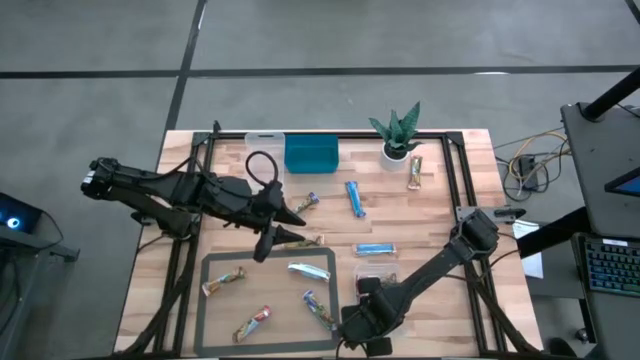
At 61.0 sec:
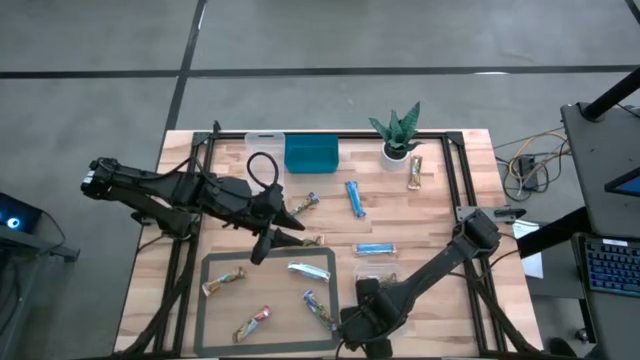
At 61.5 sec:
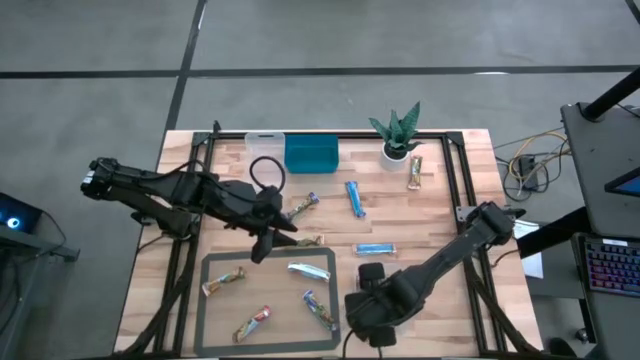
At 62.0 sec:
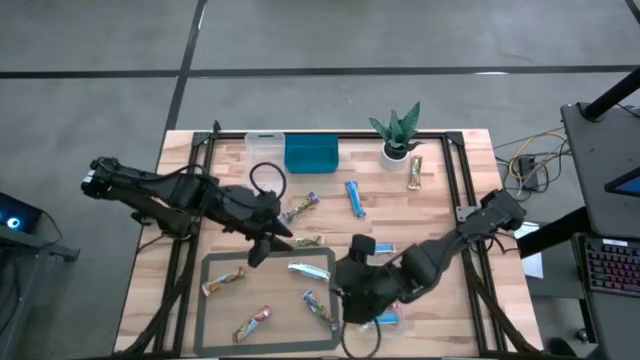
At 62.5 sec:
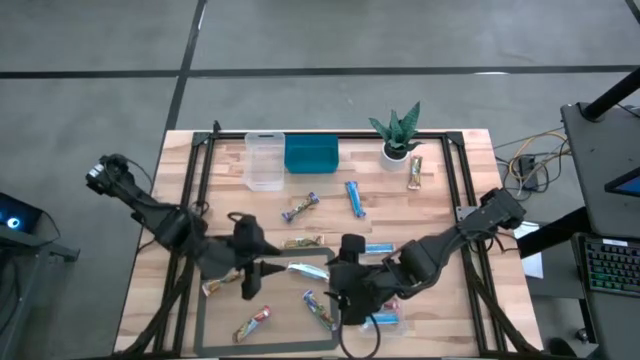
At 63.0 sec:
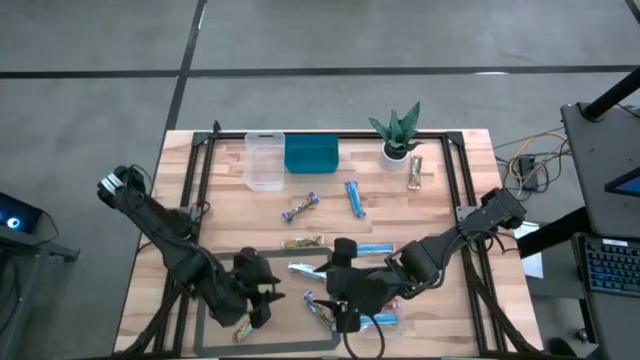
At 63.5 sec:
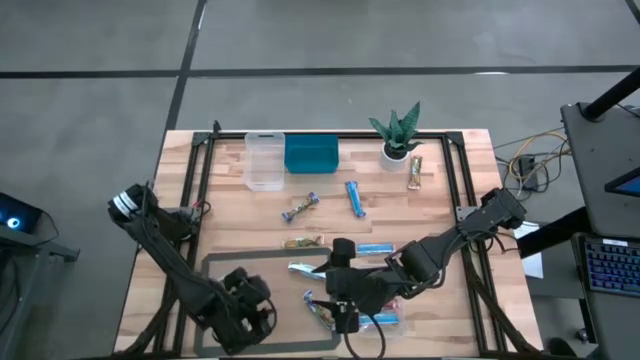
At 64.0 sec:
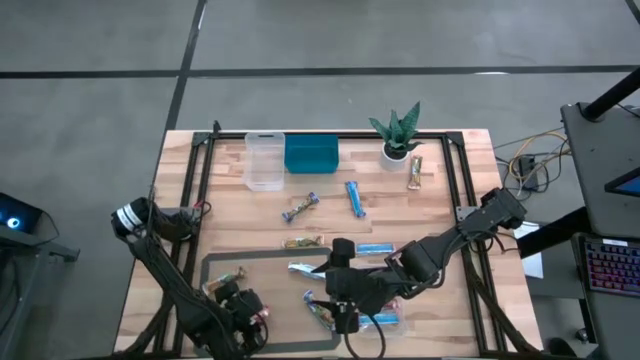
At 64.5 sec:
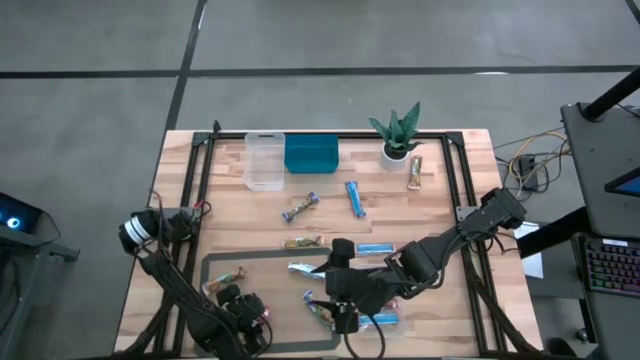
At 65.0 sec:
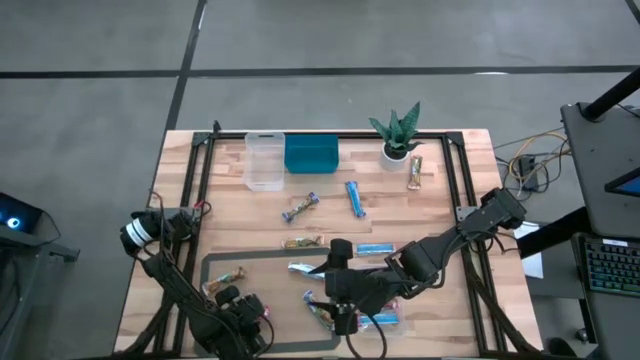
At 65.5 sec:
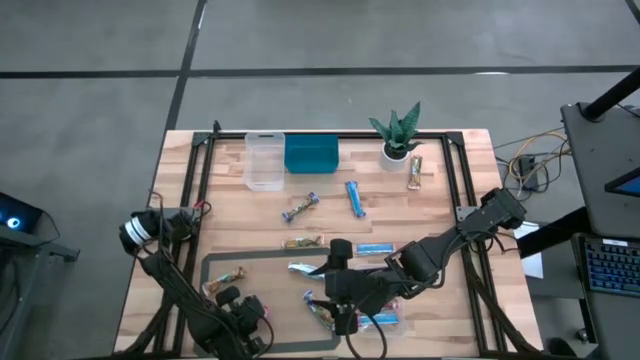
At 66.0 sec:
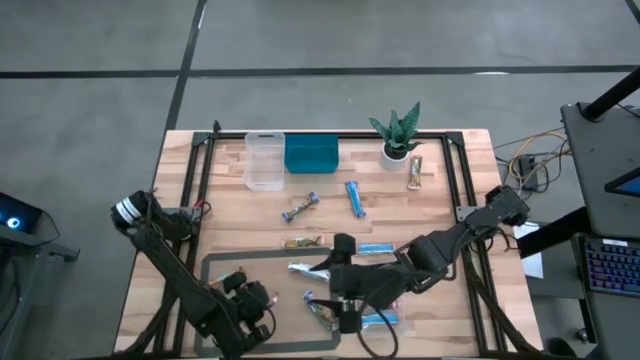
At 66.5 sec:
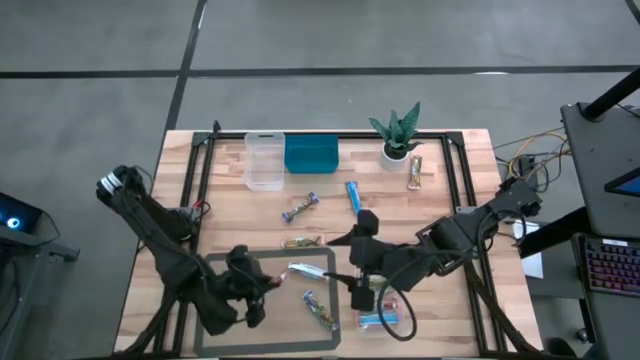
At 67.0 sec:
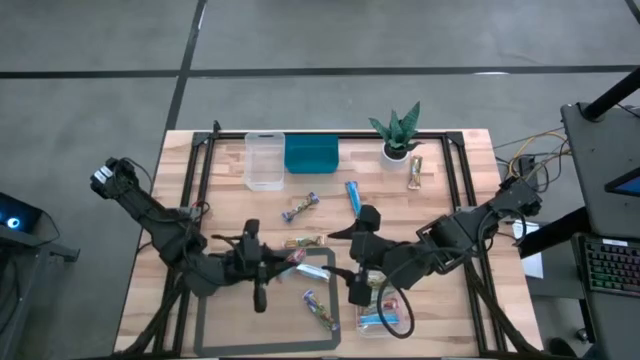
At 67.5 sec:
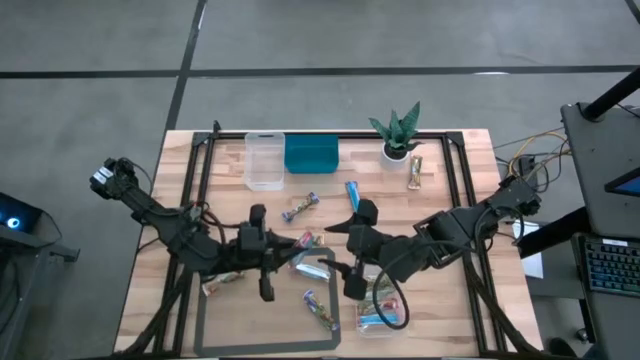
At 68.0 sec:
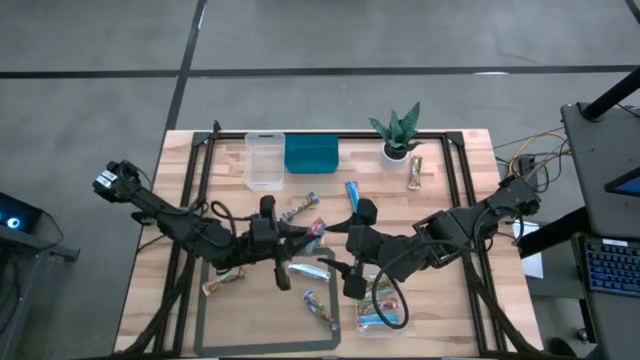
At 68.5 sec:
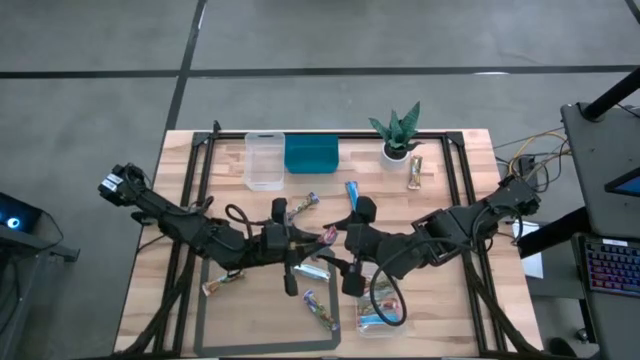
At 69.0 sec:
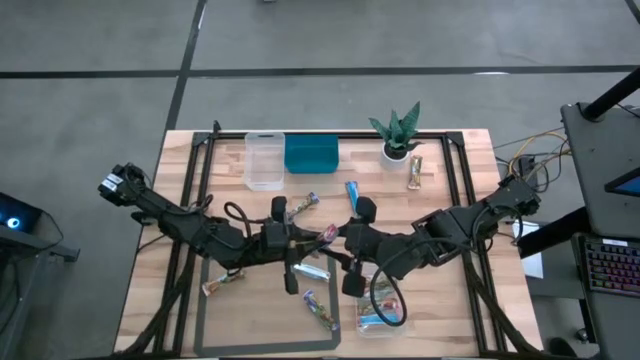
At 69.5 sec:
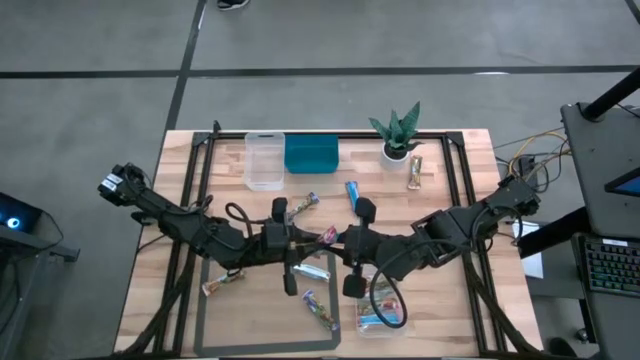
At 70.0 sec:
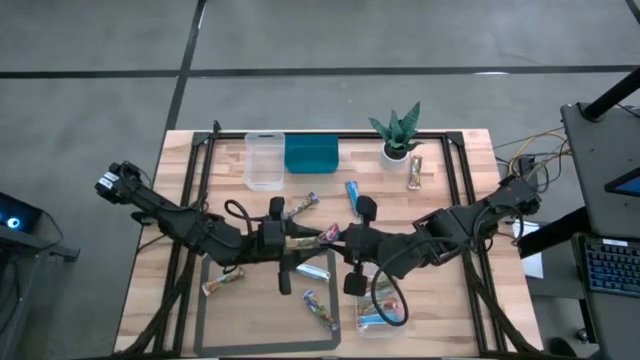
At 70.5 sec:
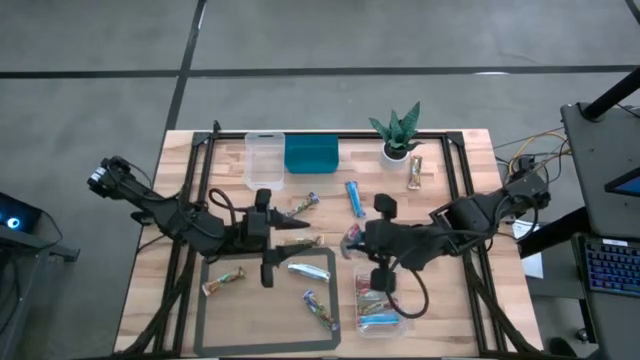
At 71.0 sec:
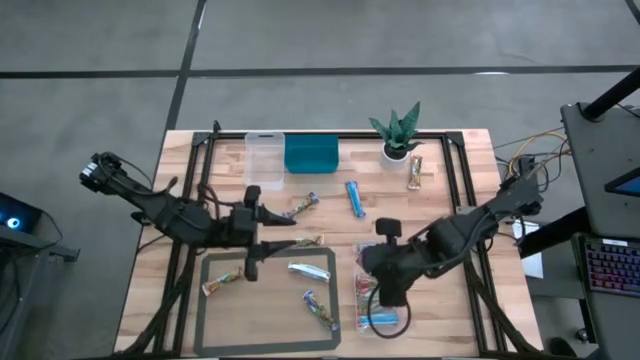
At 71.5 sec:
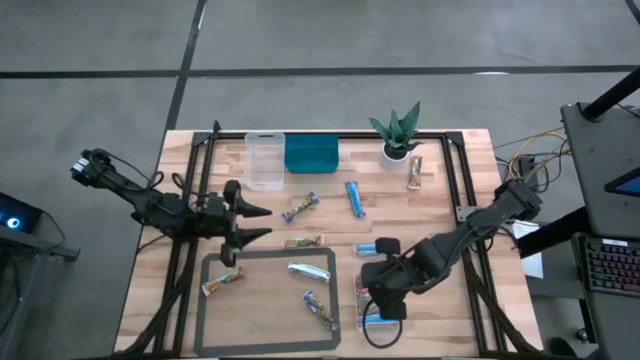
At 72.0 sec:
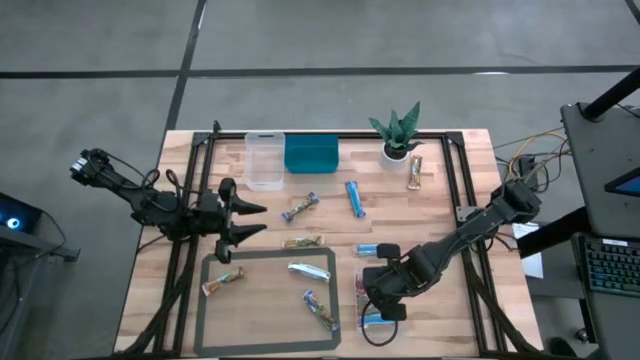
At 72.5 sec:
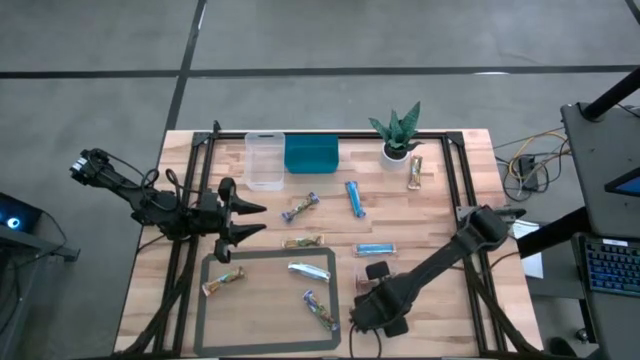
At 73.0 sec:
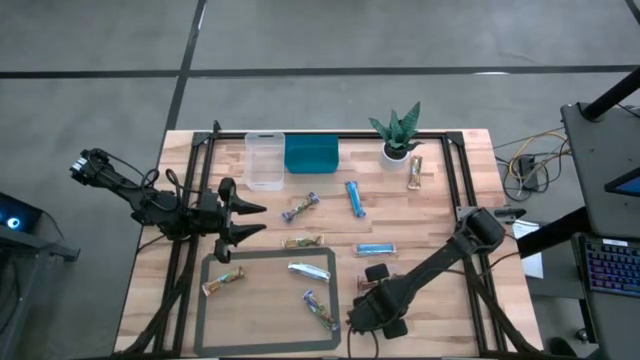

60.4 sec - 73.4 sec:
Task: Pick and place Granola Bars by type
Put the red granola bar into the bottom transparent bin

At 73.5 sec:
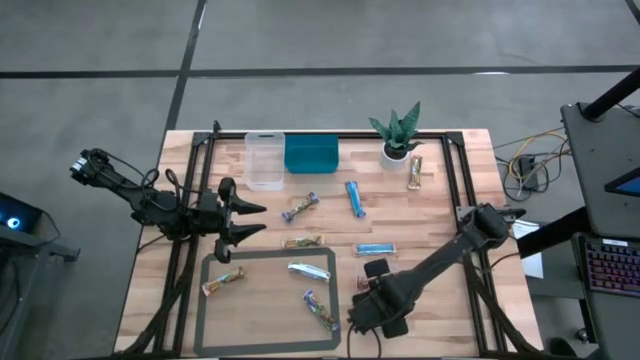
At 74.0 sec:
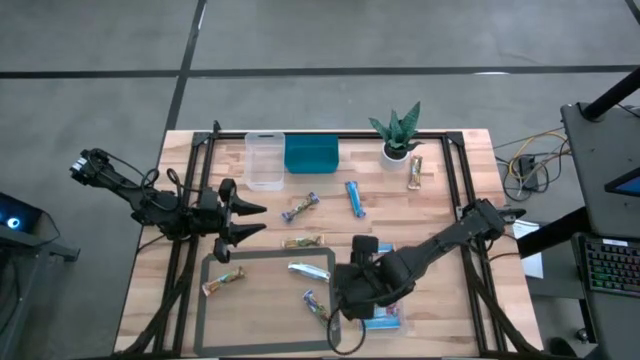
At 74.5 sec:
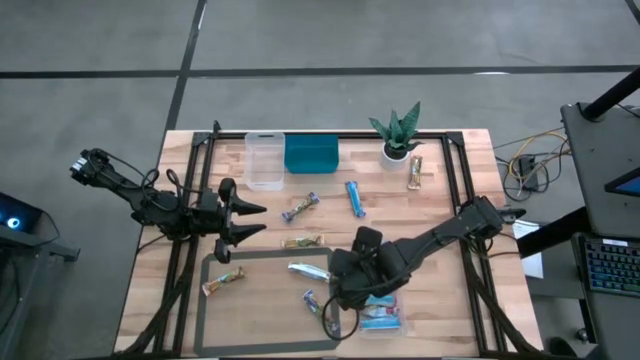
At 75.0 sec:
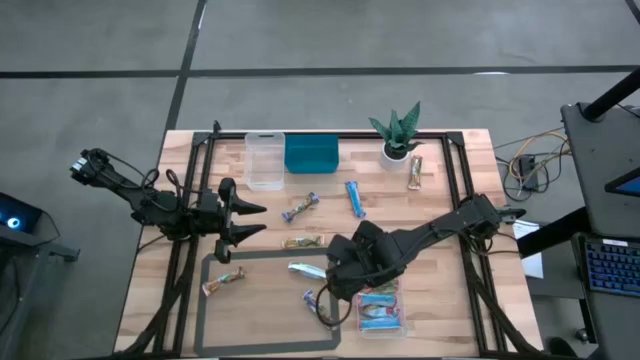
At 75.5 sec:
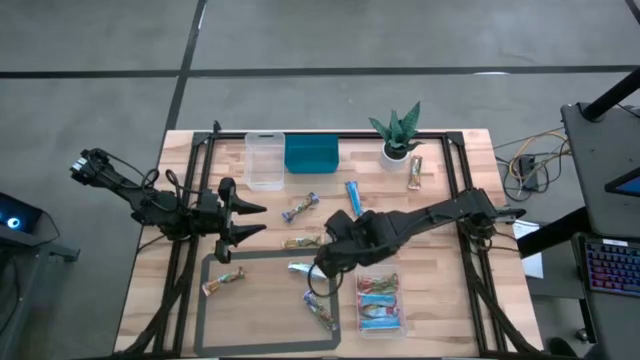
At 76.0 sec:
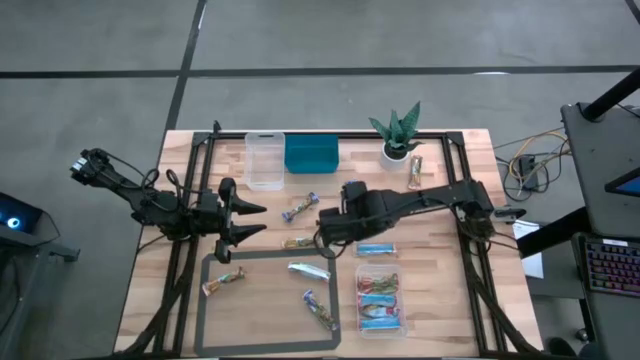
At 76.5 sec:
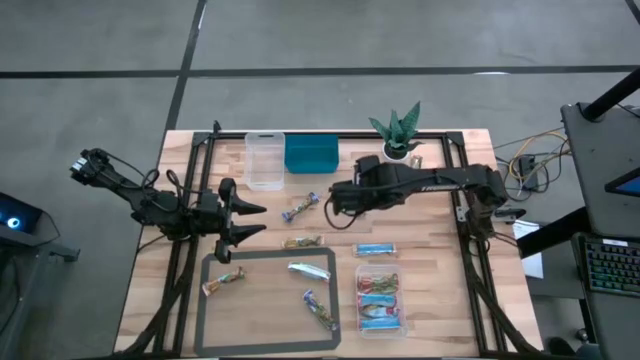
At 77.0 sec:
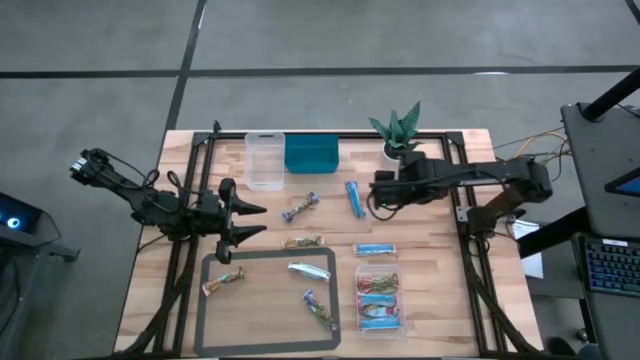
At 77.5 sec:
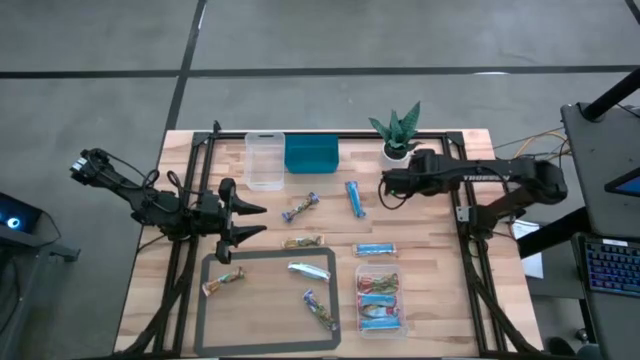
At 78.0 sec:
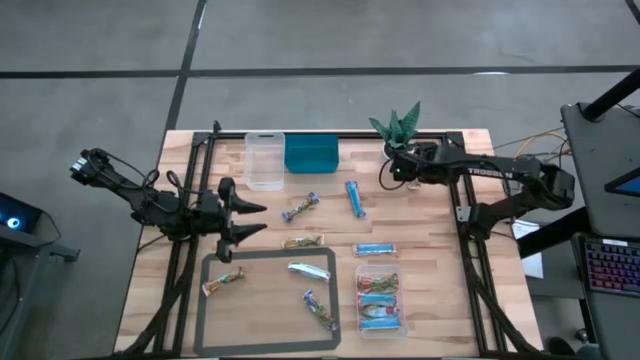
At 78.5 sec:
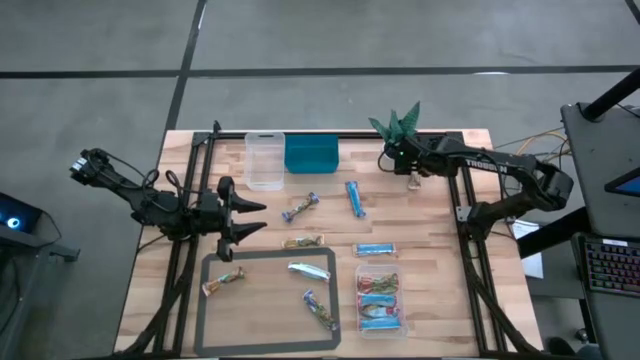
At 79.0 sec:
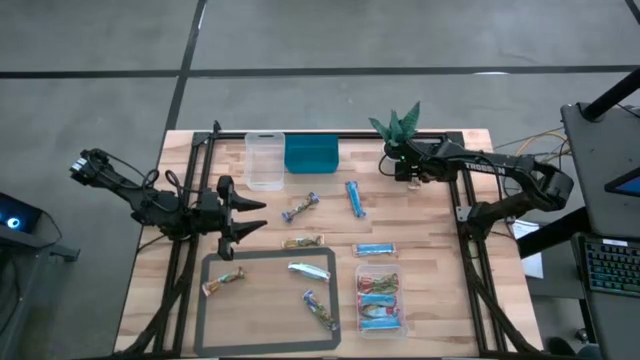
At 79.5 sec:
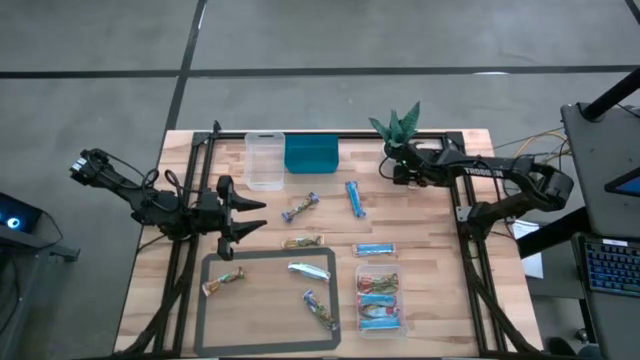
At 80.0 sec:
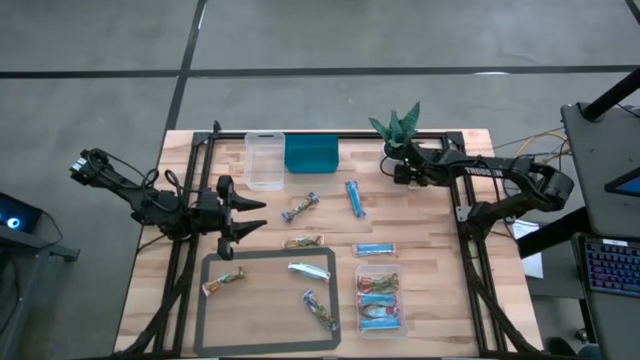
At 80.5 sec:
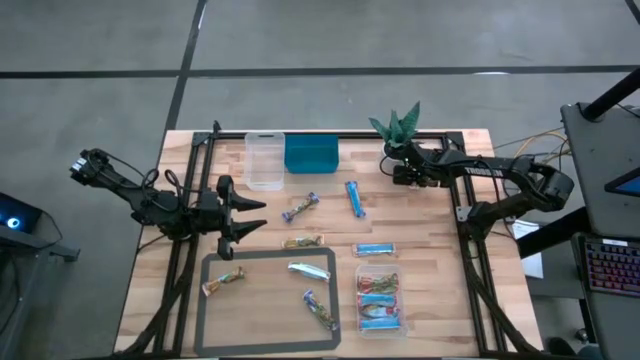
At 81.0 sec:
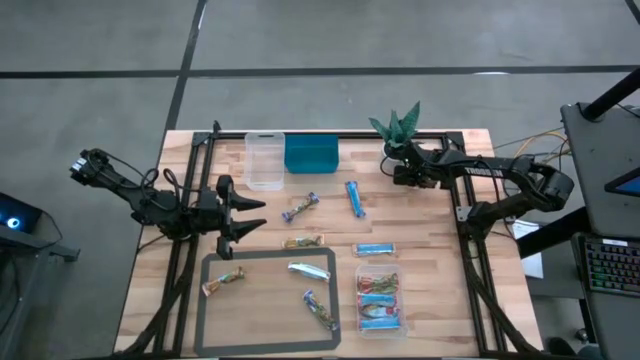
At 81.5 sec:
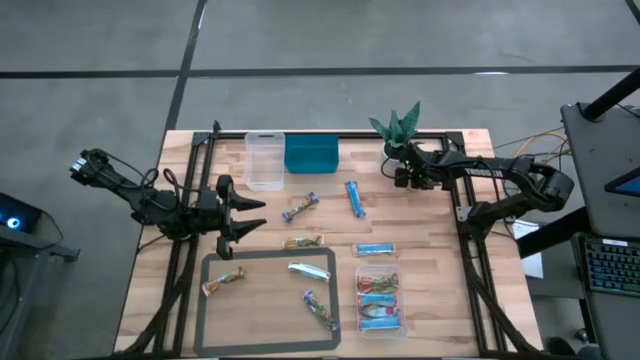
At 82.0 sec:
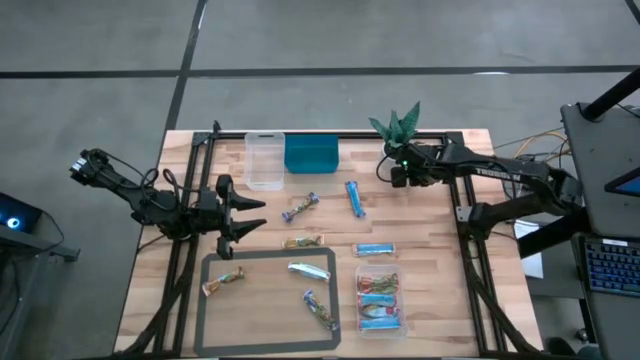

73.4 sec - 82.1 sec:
Put the yellow granola bar into the top transparent bin
